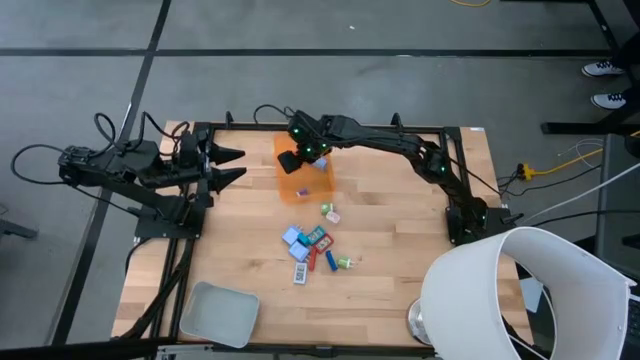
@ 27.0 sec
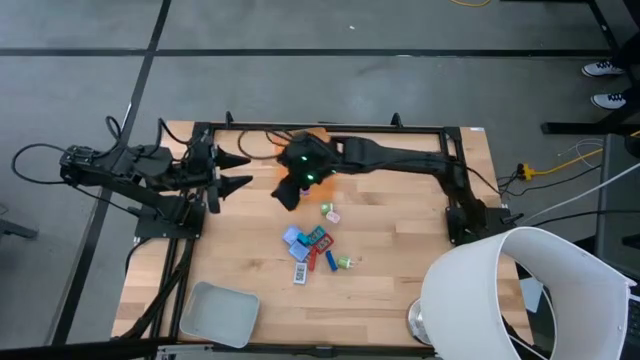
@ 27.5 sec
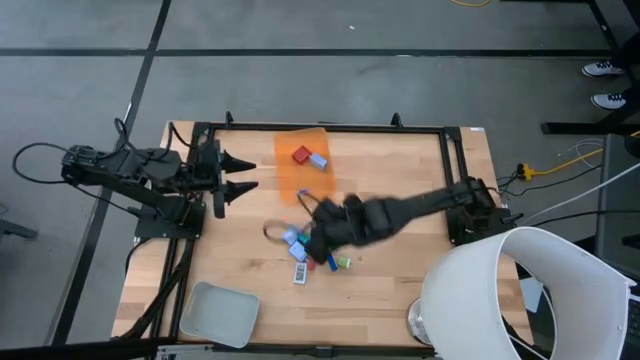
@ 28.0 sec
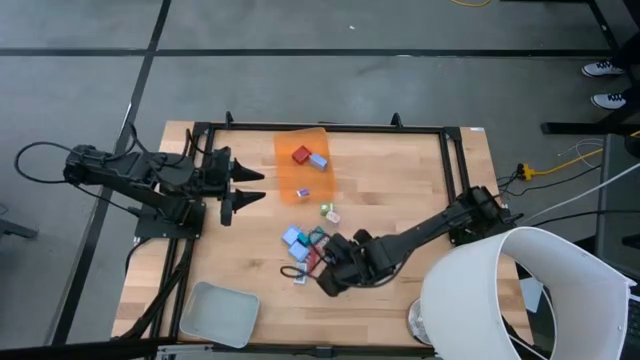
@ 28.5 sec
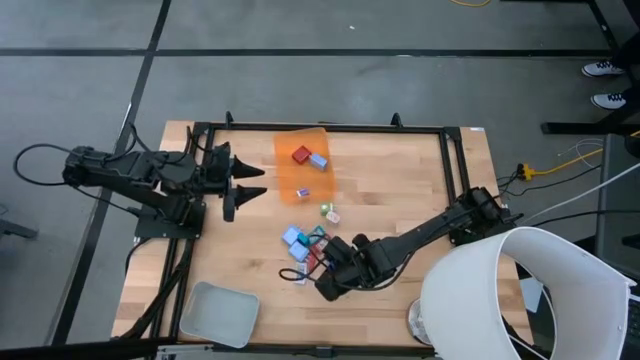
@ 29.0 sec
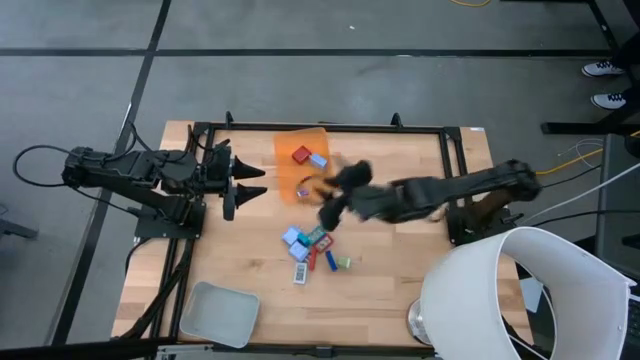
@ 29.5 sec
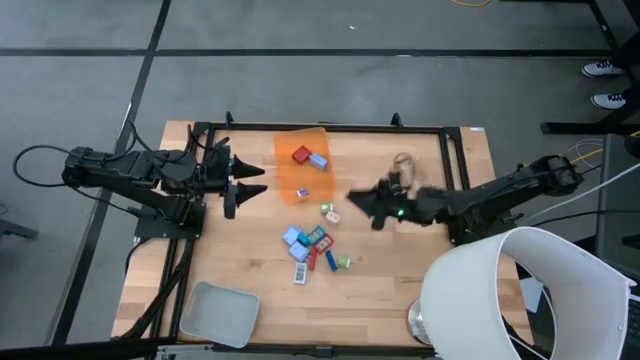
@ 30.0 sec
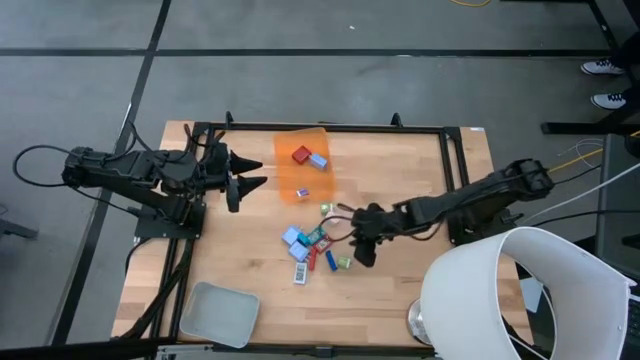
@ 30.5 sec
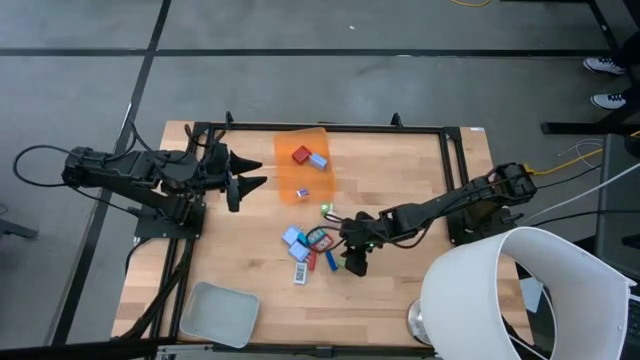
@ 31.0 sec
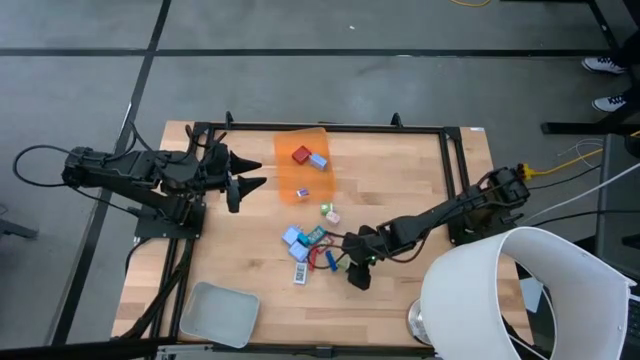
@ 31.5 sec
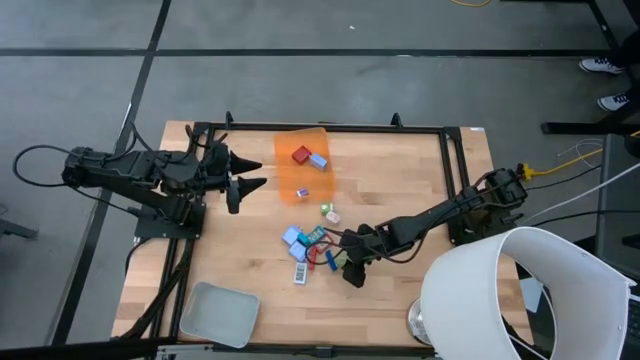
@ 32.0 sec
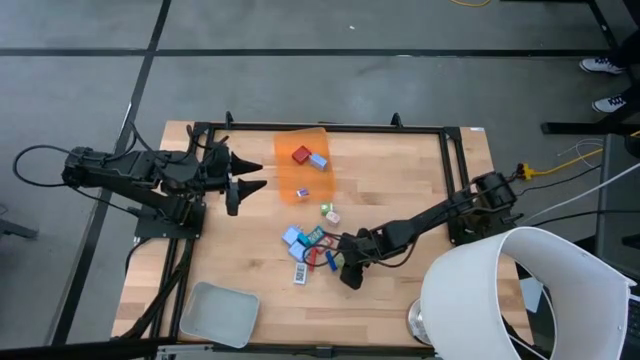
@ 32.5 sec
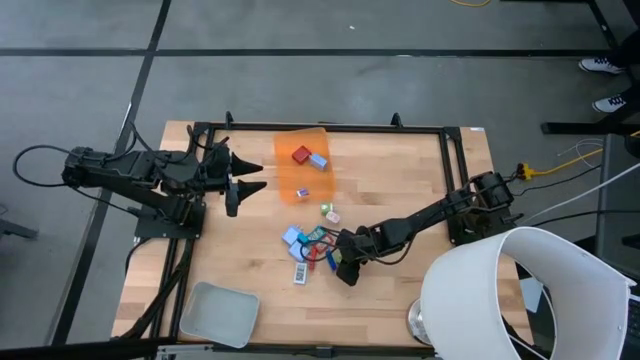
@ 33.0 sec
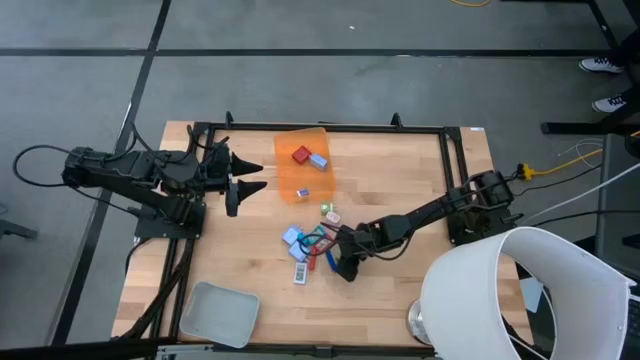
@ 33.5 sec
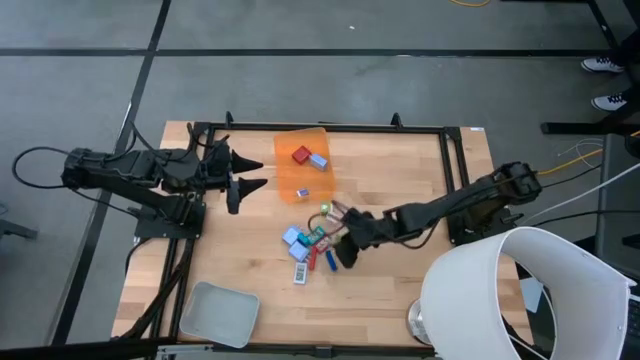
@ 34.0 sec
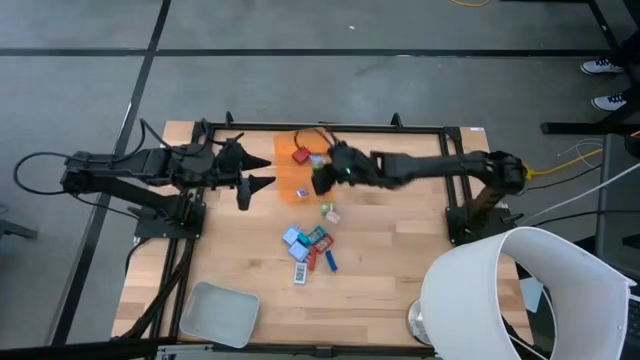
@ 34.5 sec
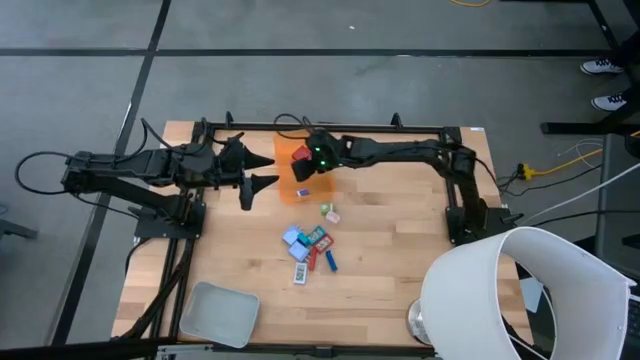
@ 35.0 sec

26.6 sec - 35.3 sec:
Task: Pick & Place Office items
Put the bottom green charger adapter into the orange bin

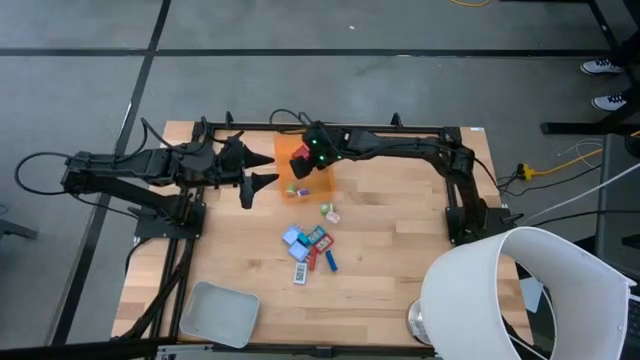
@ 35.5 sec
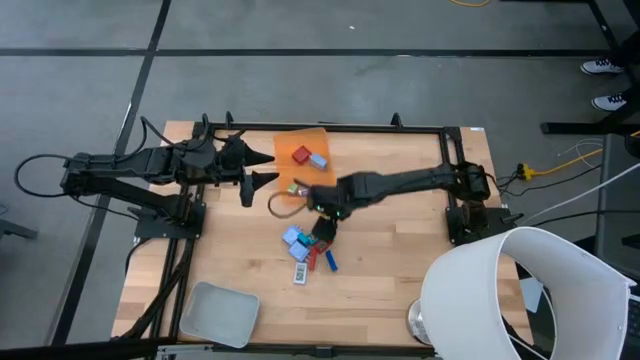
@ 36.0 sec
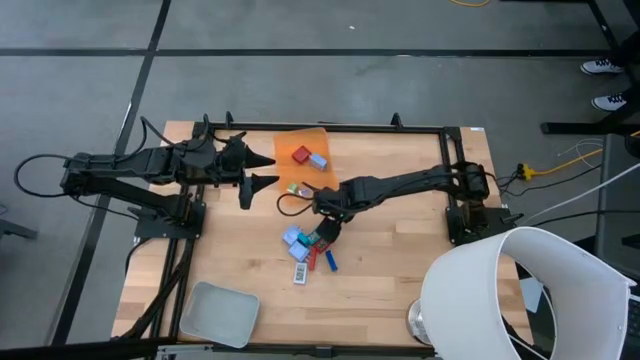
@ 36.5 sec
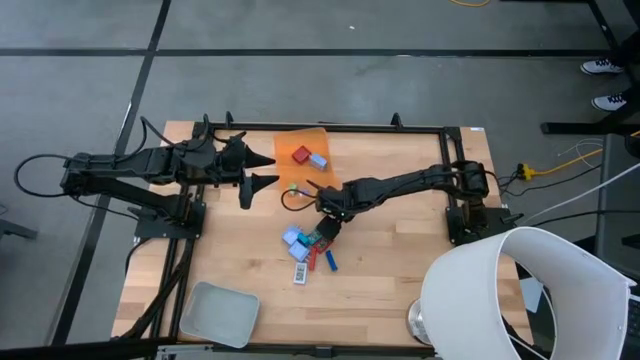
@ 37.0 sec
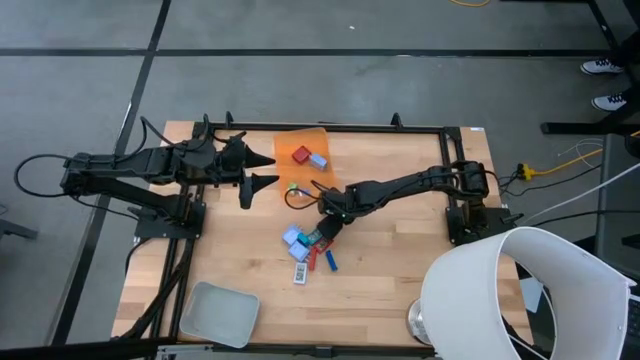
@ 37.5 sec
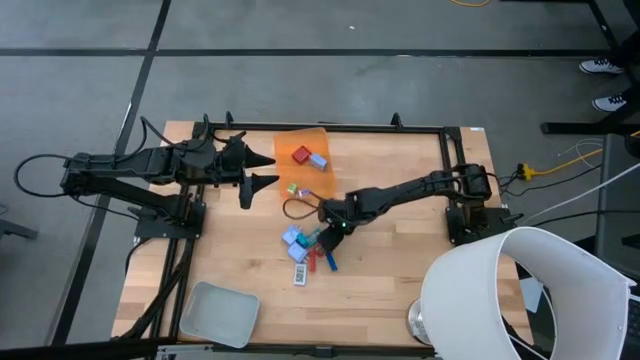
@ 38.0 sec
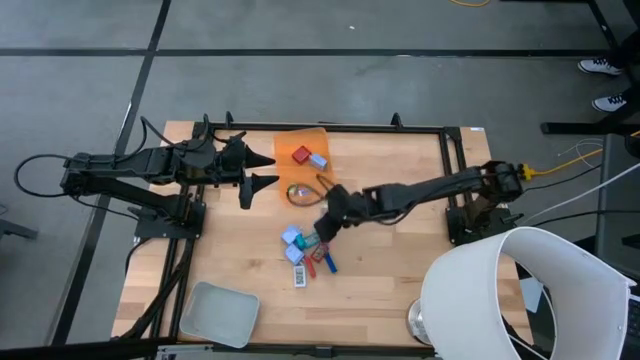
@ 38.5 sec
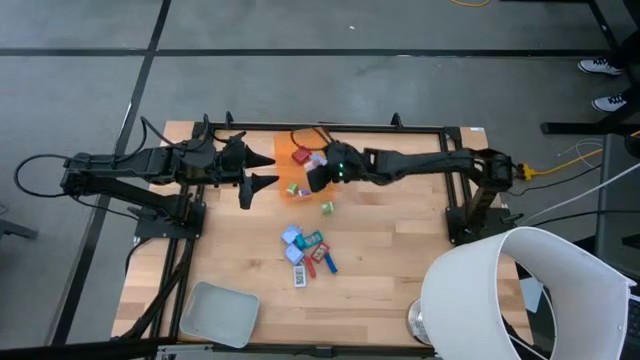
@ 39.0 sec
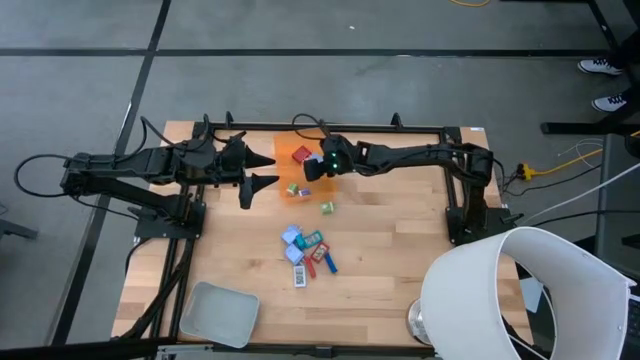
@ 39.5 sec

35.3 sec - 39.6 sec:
Put the pink charger adapter into the orange bin

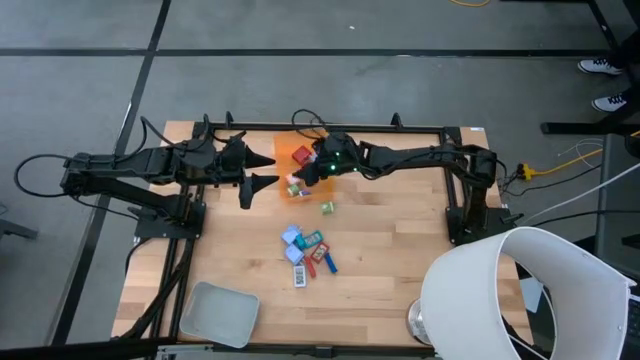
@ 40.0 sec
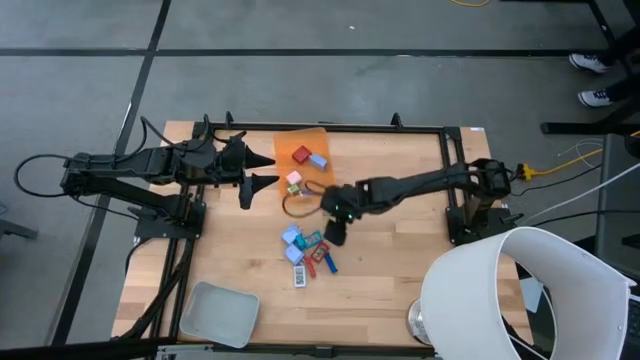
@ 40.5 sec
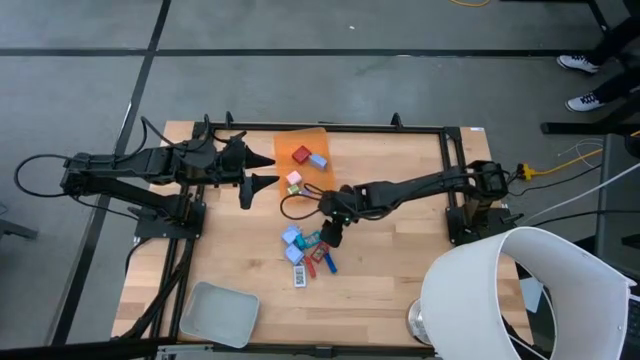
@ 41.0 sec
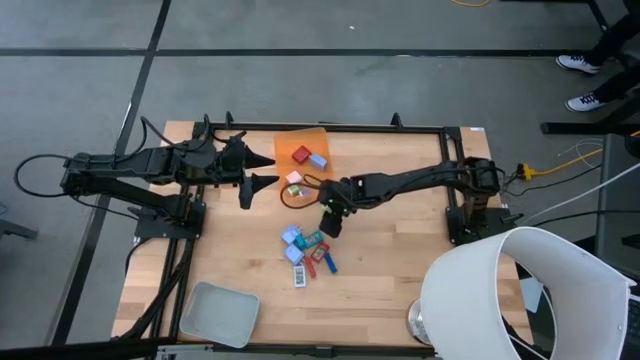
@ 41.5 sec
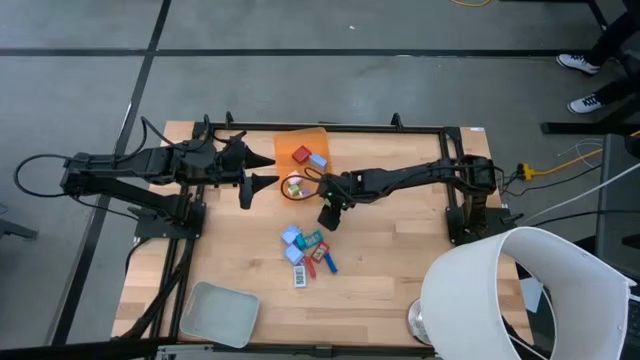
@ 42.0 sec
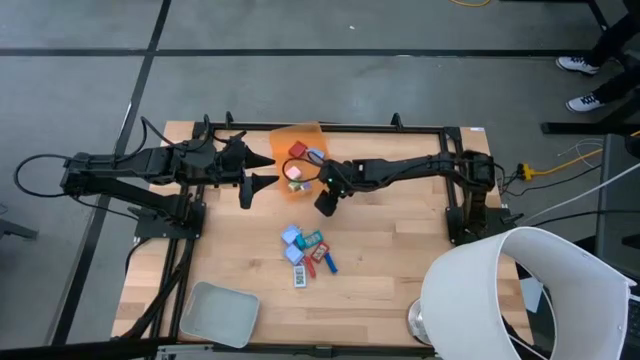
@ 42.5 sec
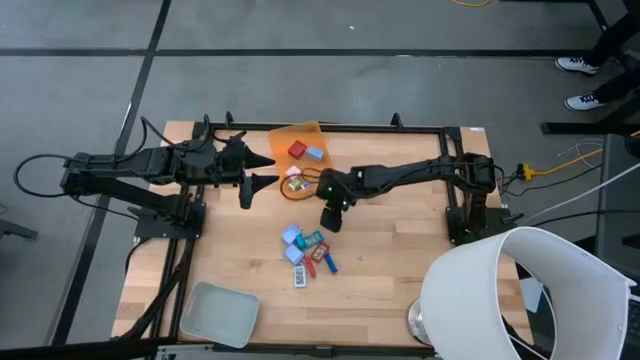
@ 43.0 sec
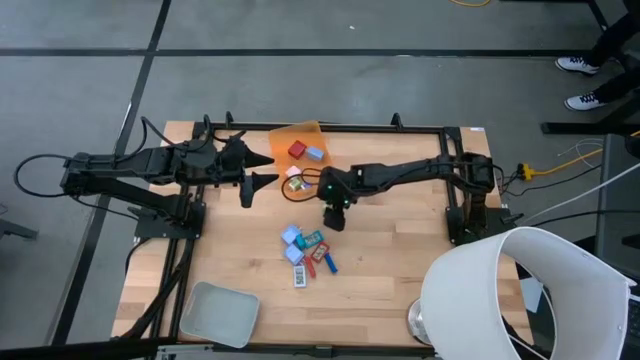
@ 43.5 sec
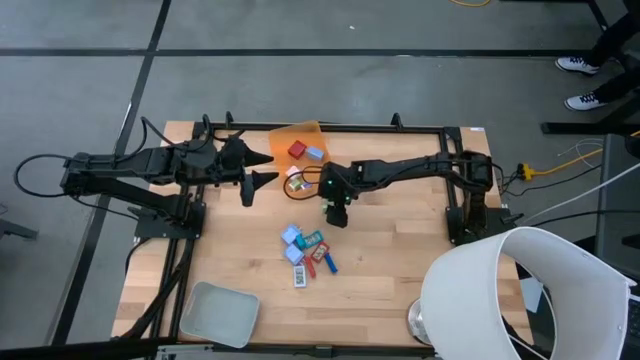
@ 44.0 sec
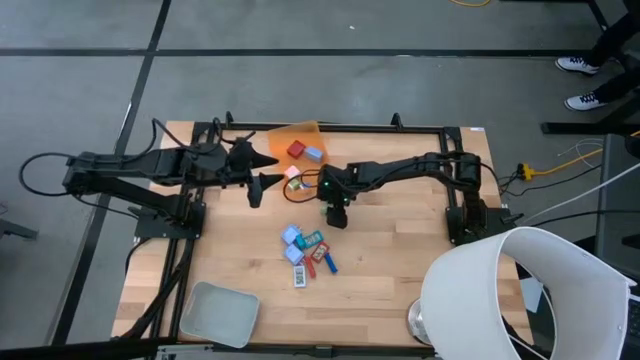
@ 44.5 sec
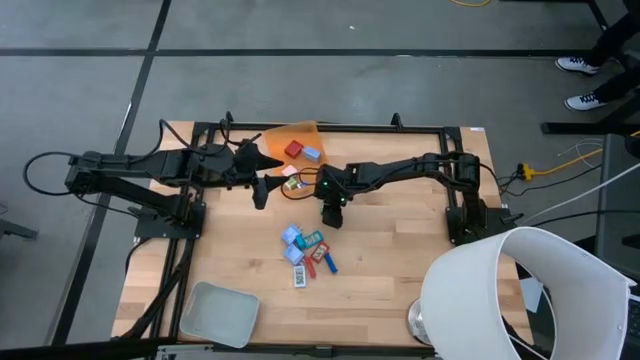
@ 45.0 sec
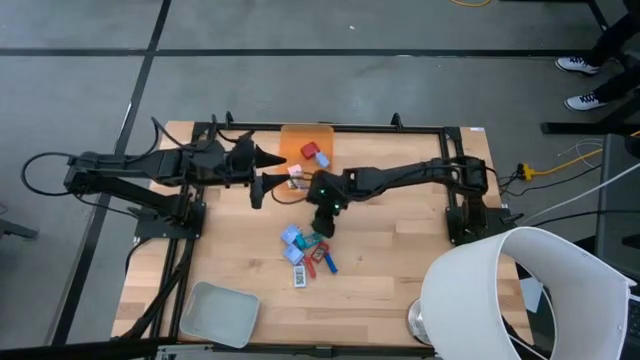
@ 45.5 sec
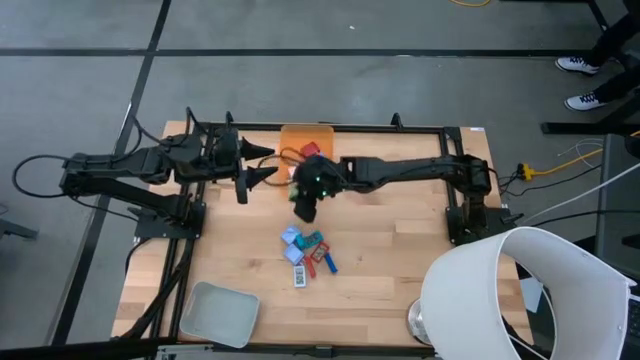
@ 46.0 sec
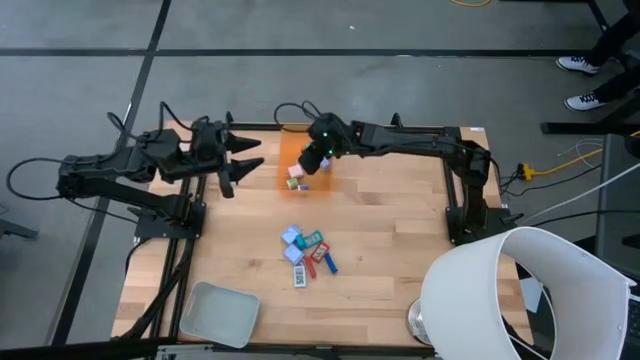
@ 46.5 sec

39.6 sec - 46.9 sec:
Put the green charger adapter into the orange bin

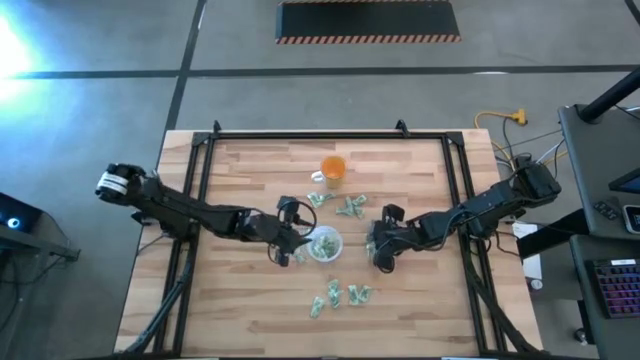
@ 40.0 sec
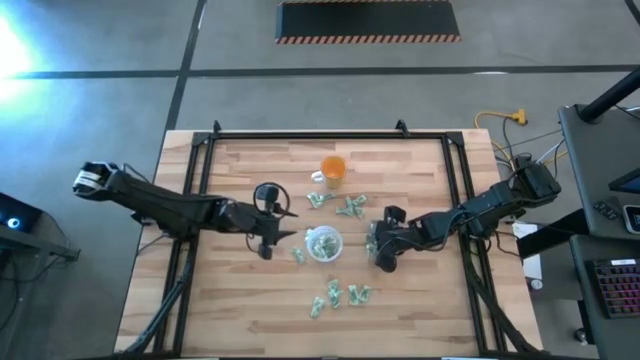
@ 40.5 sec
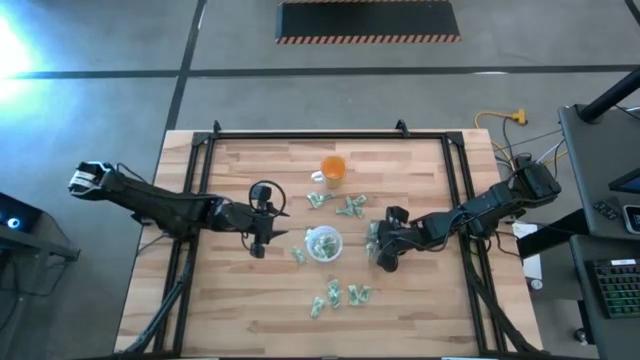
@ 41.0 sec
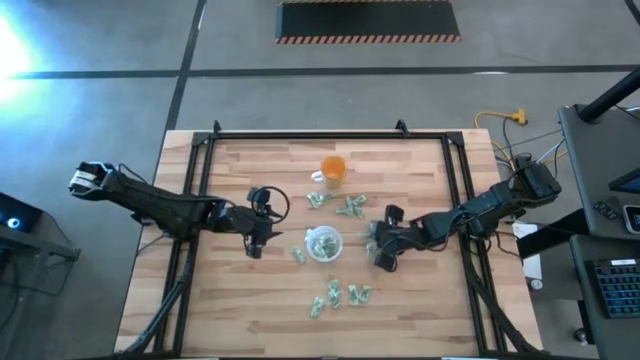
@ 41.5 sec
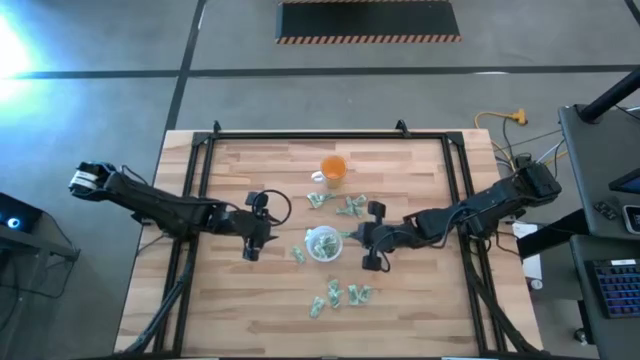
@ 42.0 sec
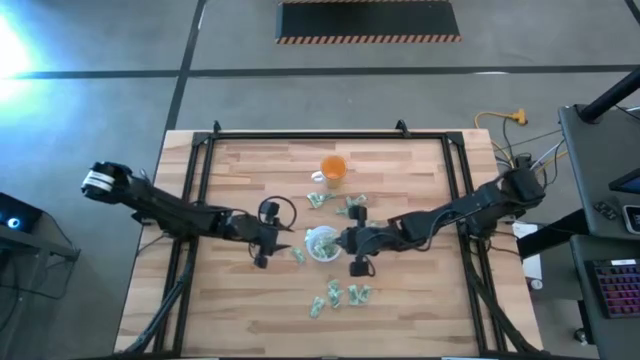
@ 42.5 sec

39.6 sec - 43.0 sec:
Task: Pick and place Stevia / Truvia into bins
Put the green stevia packet into the transparent container
